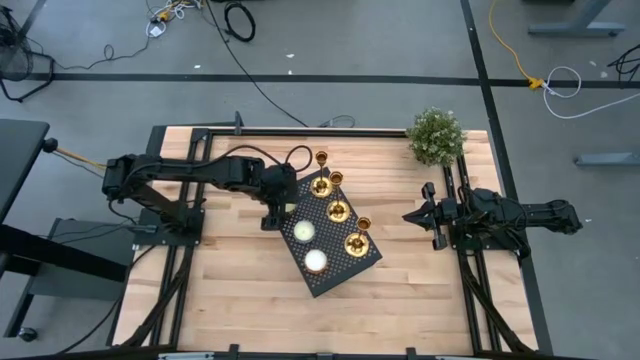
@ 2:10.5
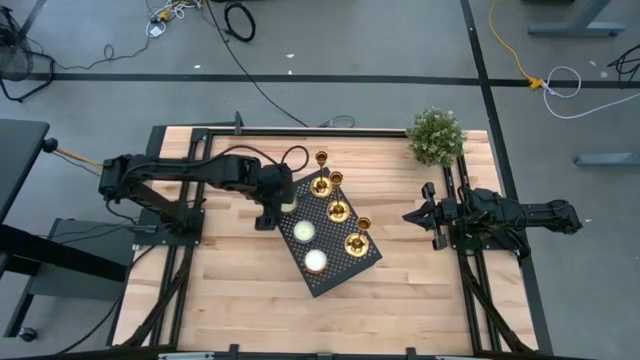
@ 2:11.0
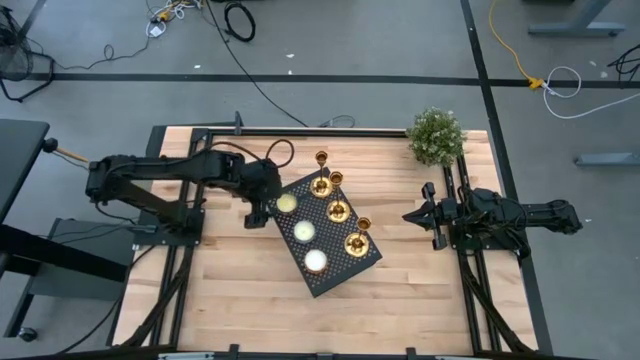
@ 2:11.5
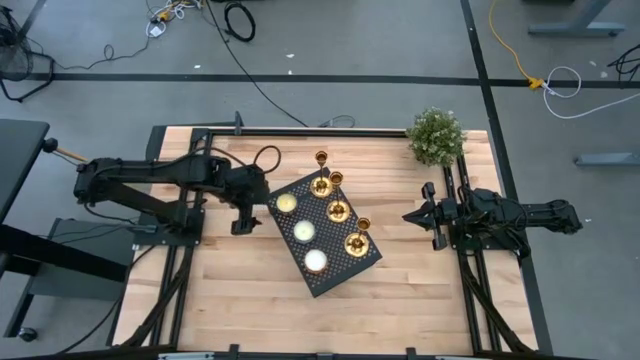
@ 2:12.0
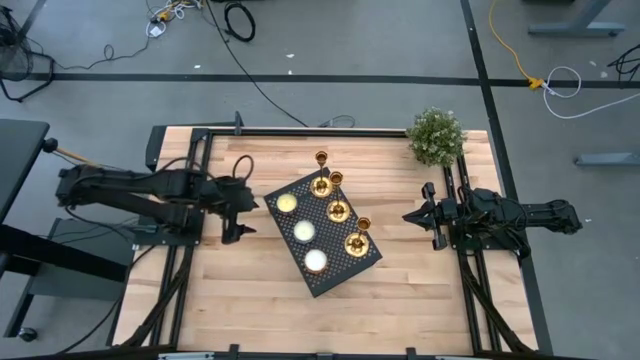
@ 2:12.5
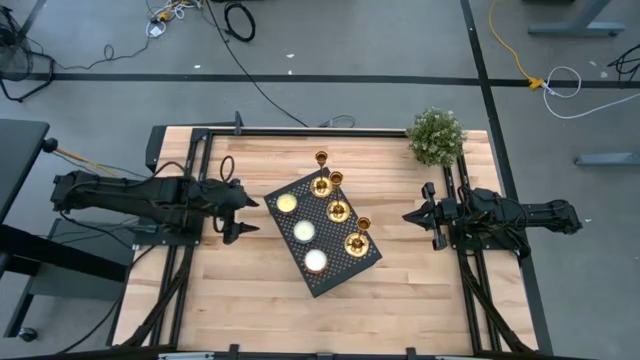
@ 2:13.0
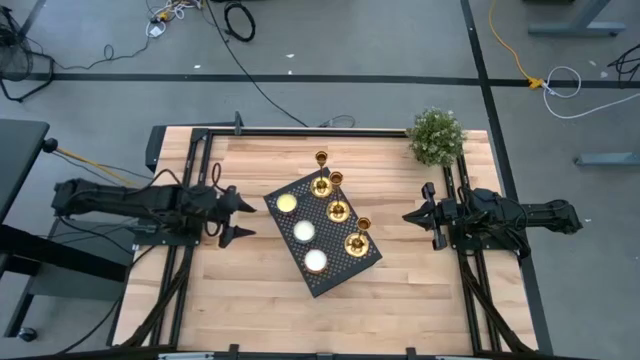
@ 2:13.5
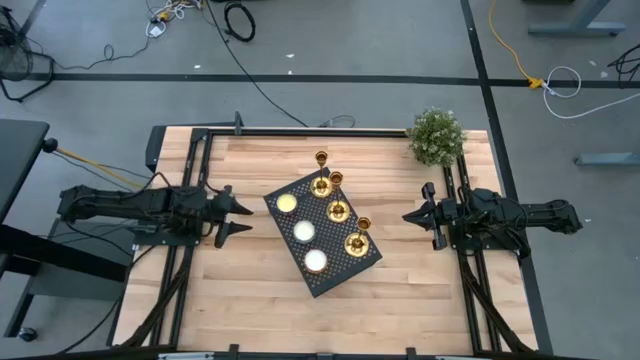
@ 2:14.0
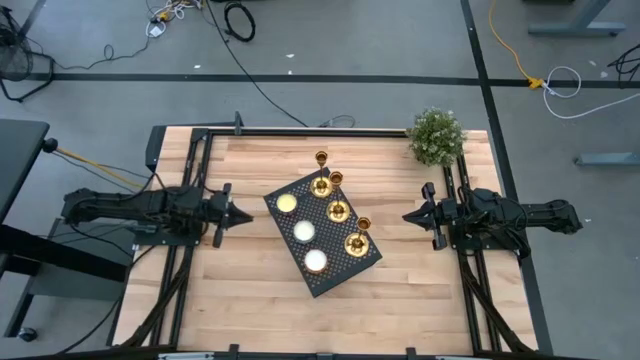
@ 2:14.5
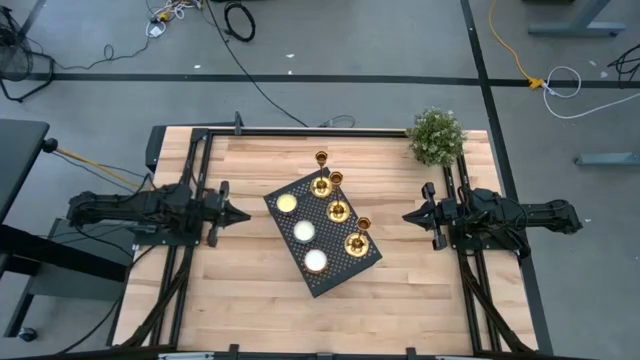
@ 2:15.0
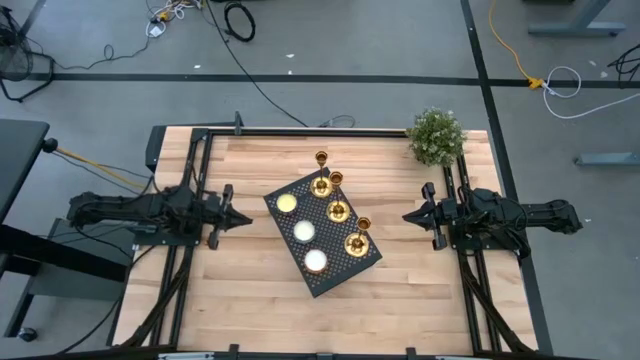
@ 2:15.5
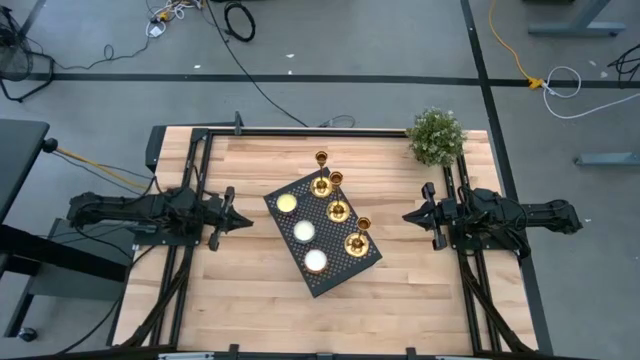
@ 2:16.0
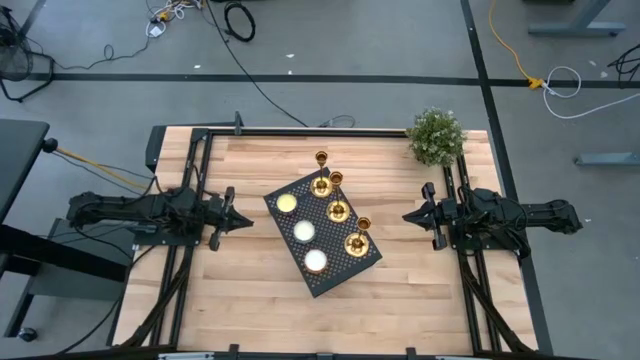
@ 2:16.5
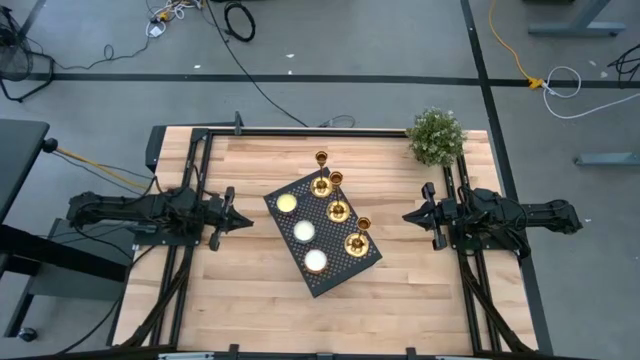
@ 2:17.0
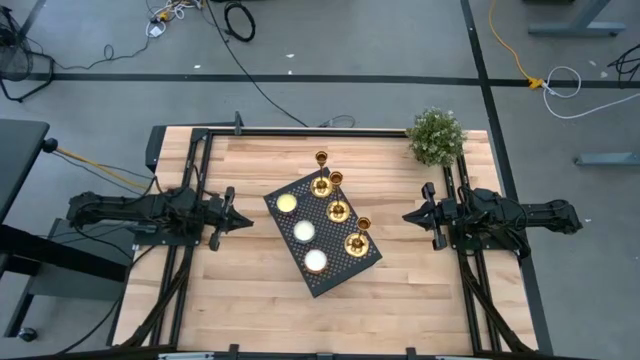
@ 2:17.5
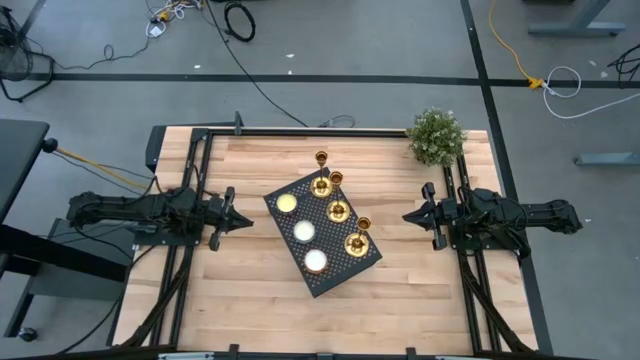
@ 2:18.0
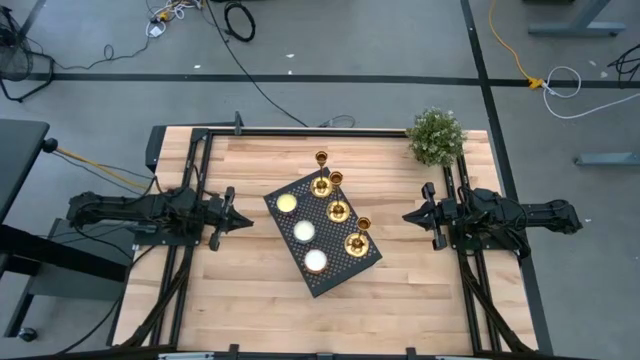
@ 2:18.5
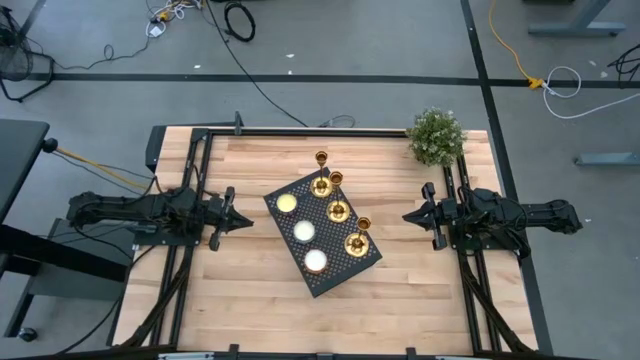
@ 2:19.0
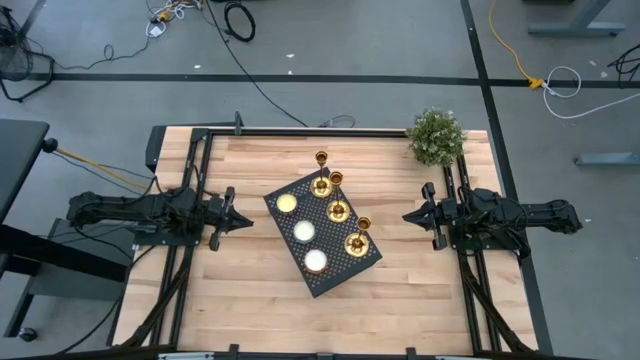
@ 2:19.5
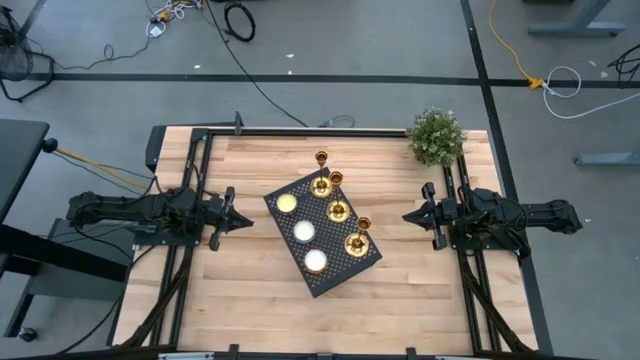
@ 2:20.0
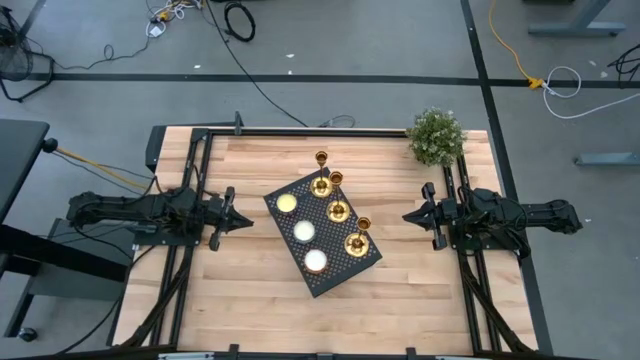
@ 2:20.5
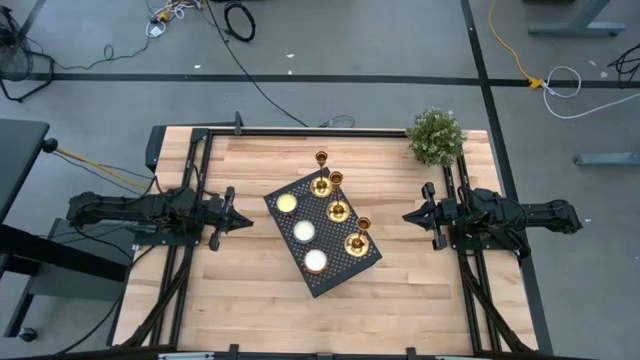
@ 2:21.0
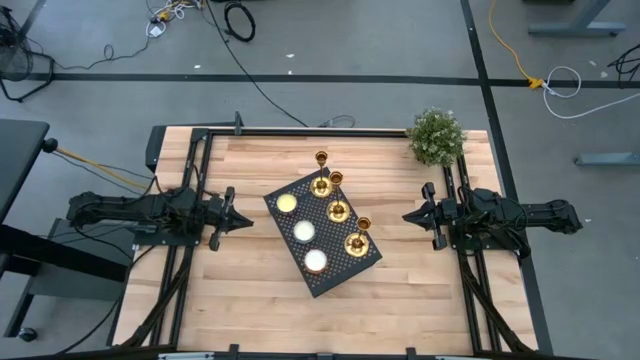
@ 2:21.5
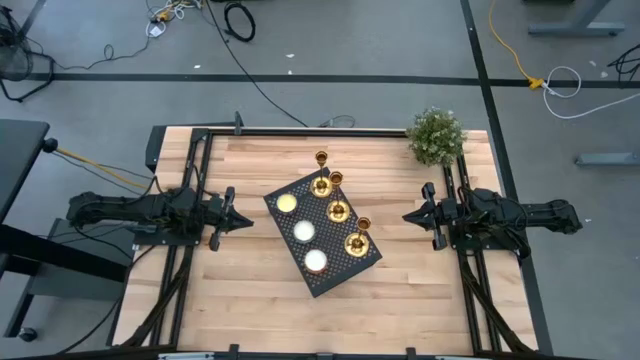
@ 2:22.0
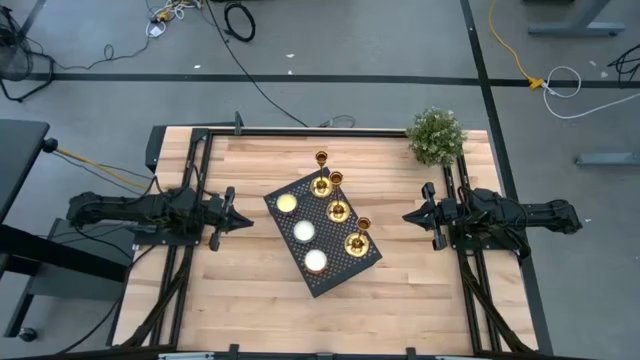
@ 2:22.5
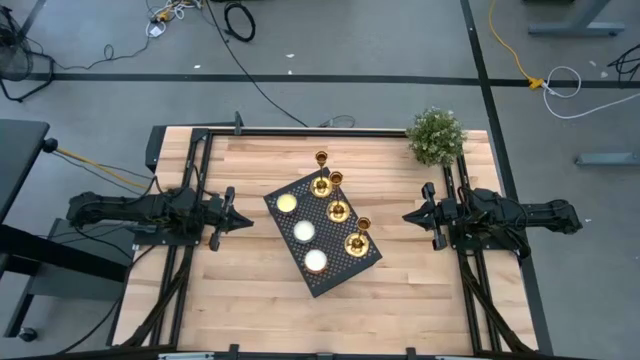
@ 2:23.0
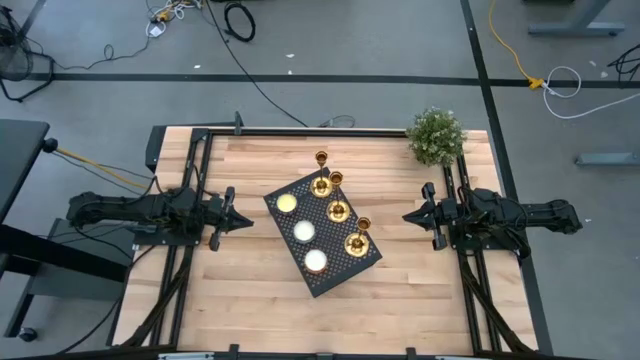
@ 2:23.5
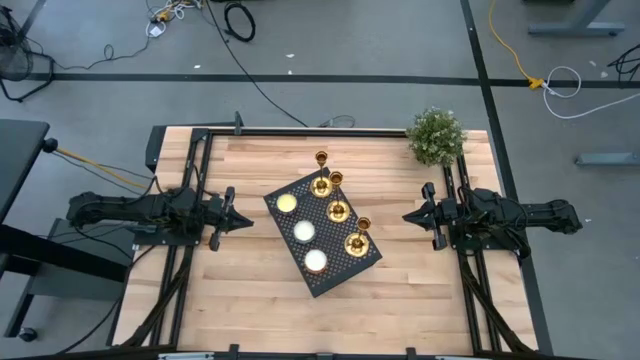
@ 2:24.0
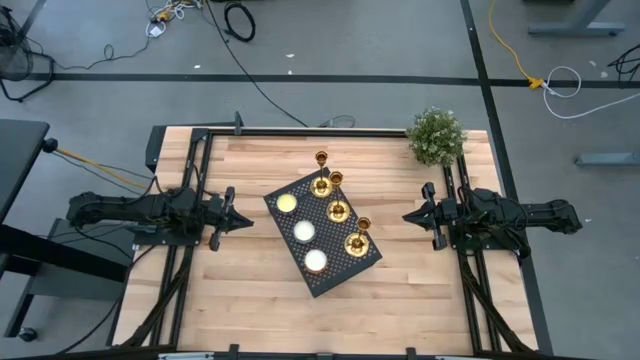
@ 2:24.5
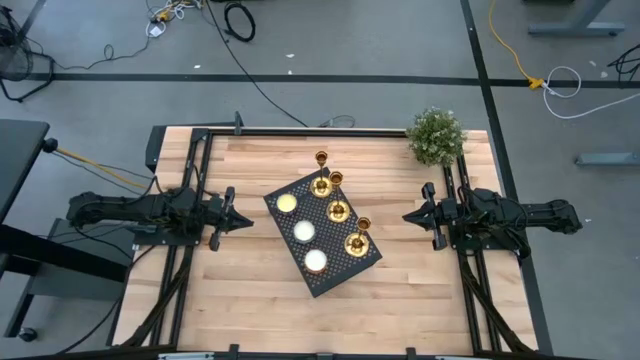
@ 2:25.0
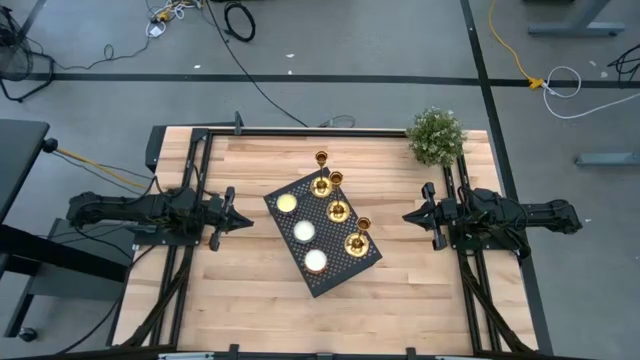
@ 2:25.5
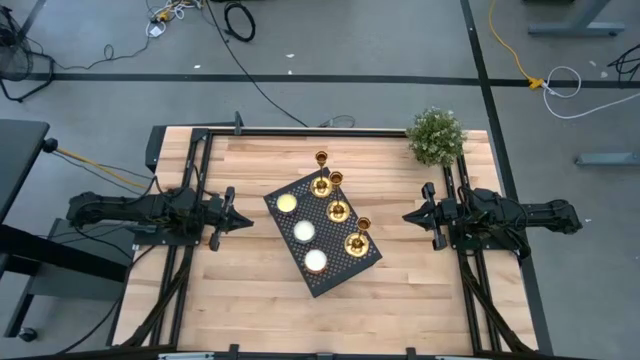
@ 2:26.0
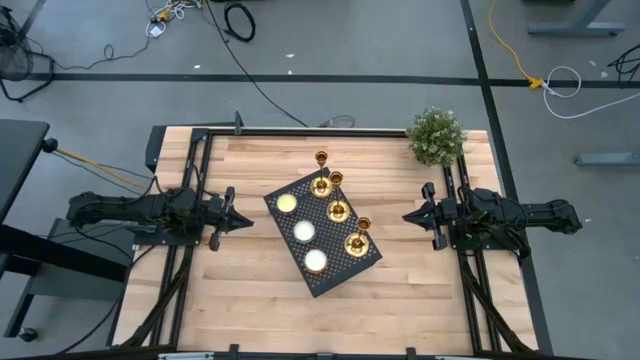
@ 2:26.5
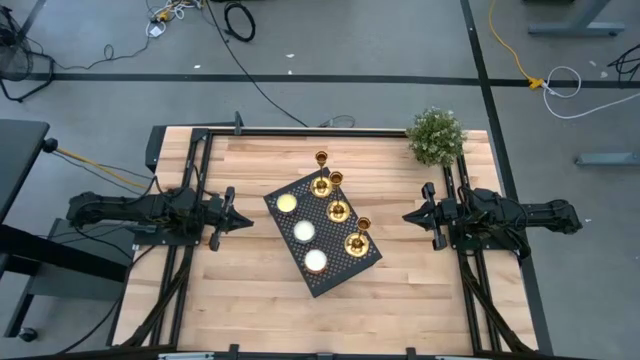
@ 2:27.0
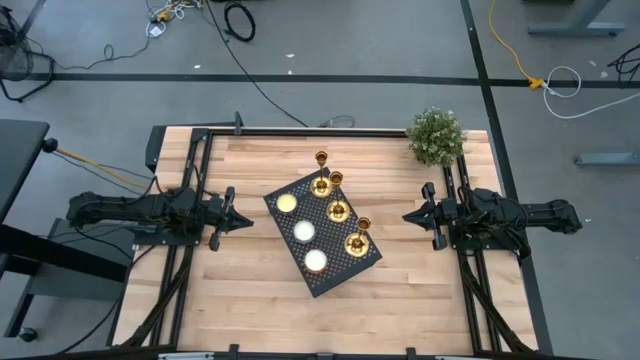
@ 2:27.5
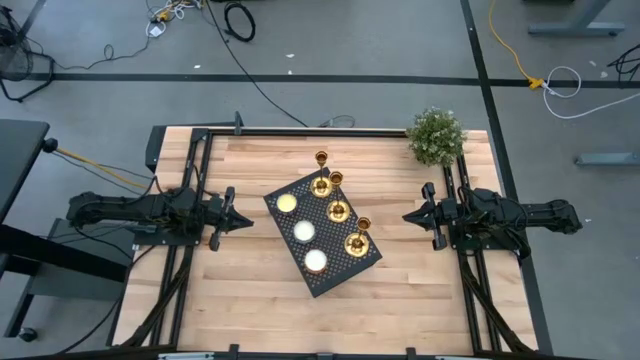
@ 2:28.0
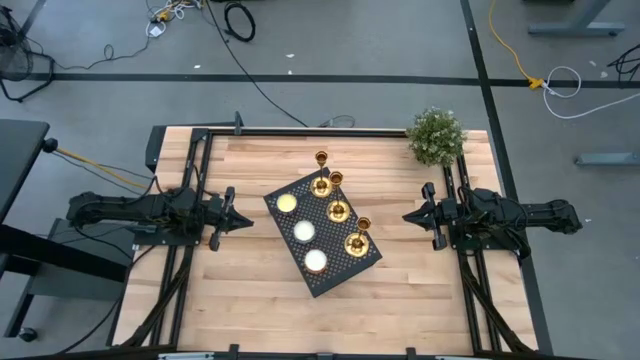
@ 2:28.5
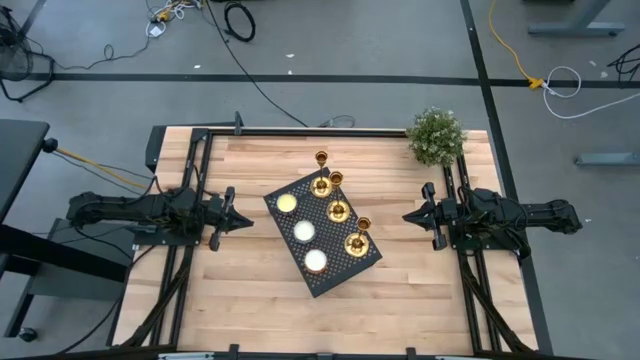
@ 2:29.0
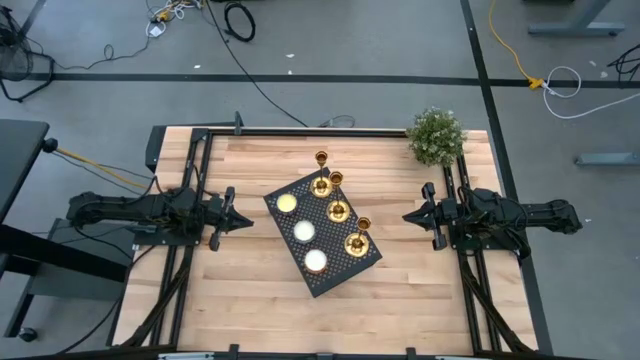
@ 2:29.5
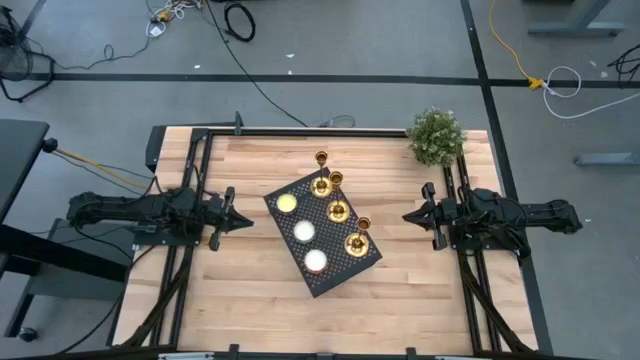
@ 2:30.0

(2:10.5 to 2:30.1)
Task: Pick & Place candle stick holders
Return to Home Position

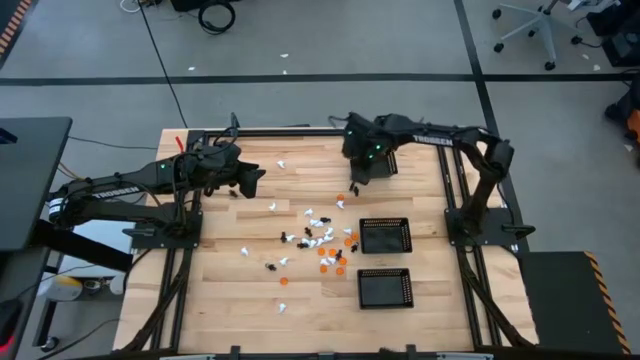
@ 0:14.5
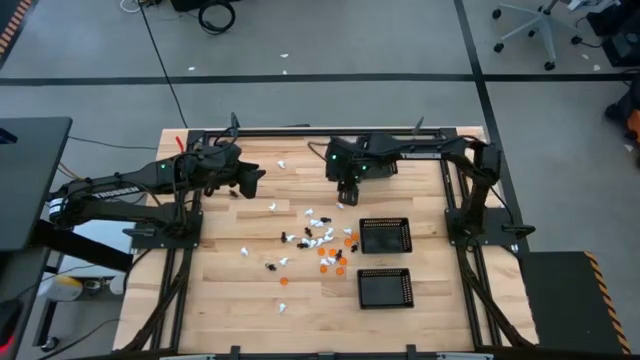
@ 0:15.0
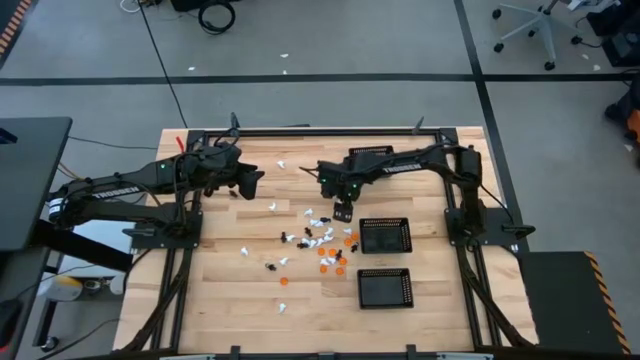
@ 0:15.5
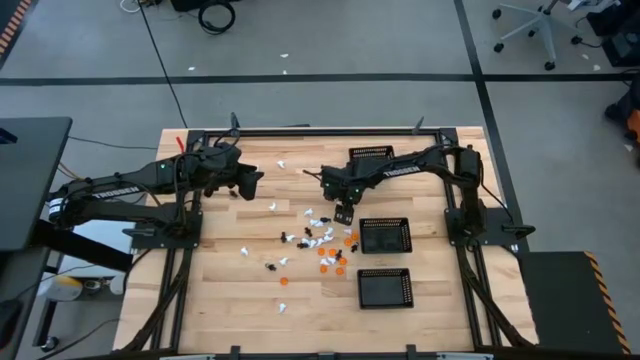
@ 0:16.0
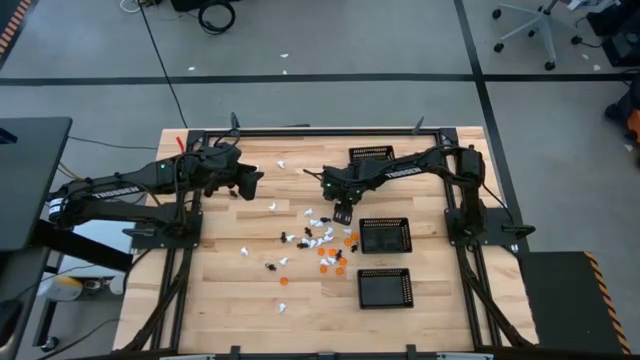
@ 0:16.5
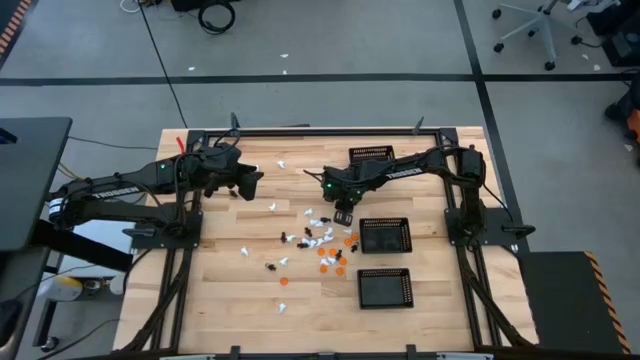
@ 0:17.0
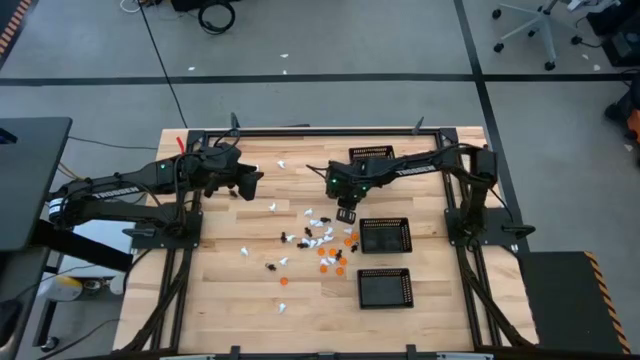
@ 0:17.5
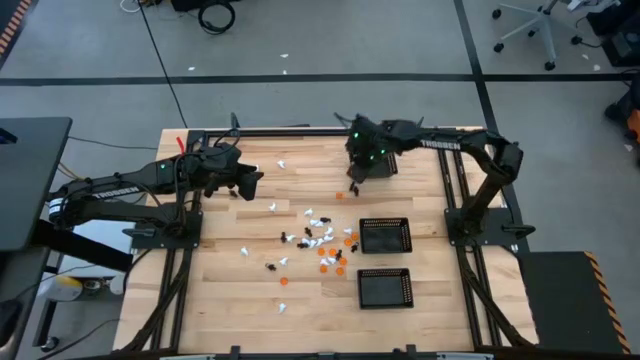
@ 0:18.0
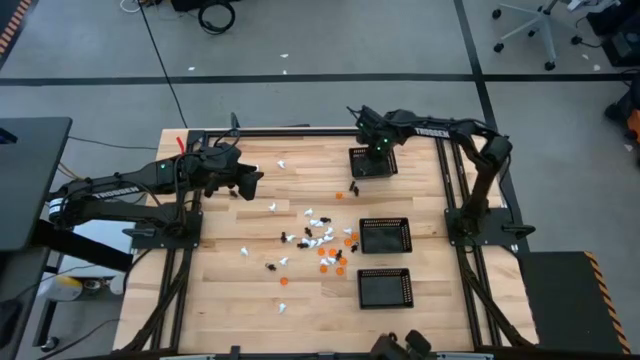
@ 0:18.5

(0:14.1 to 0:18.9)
Task: Sort Halloween decoration
Put the white ghost toy into the top black bin
